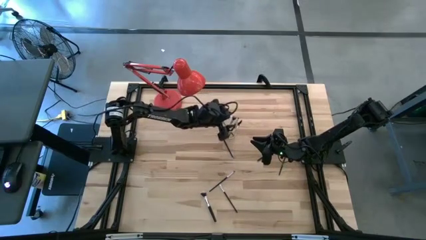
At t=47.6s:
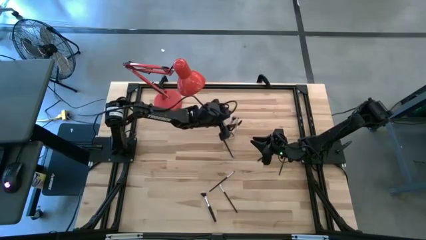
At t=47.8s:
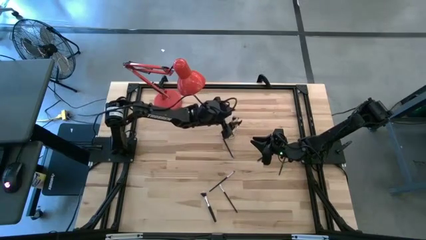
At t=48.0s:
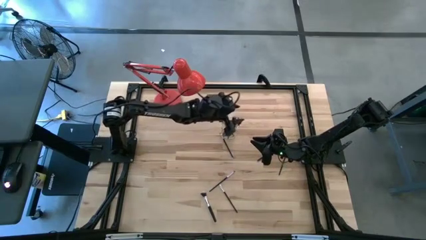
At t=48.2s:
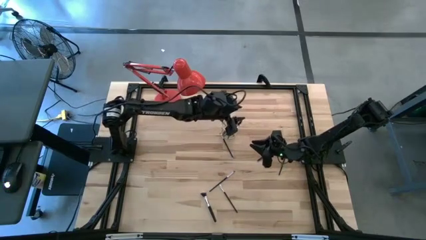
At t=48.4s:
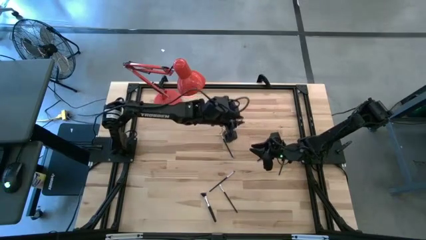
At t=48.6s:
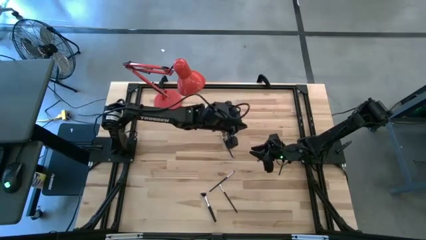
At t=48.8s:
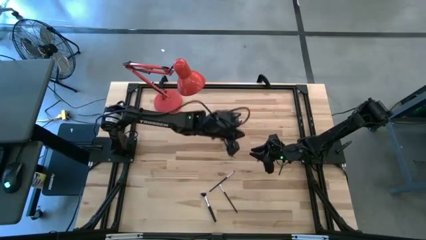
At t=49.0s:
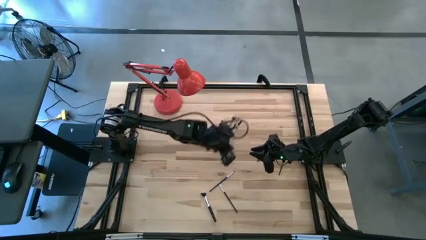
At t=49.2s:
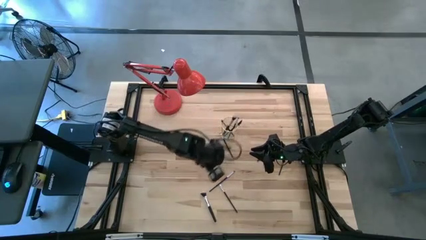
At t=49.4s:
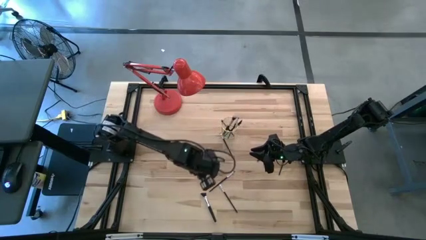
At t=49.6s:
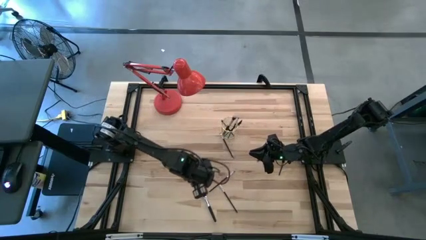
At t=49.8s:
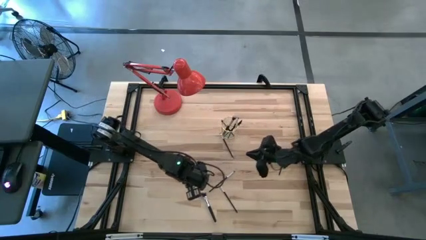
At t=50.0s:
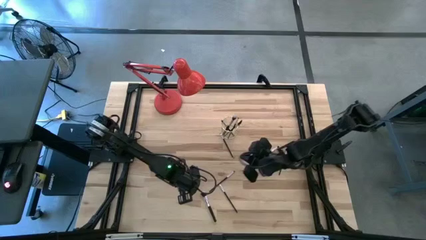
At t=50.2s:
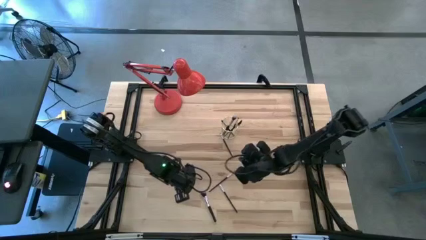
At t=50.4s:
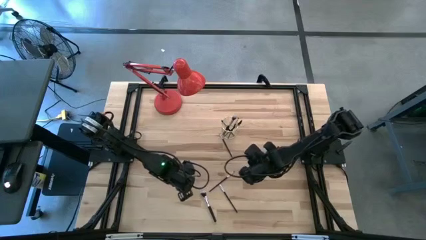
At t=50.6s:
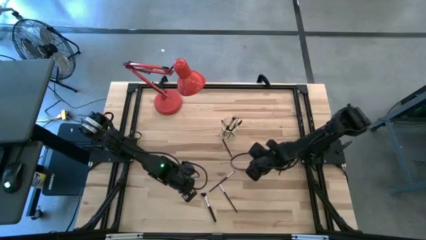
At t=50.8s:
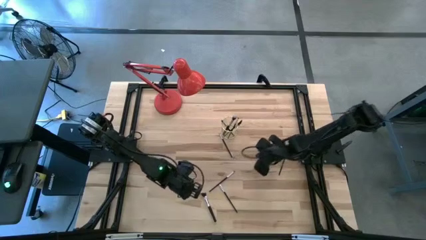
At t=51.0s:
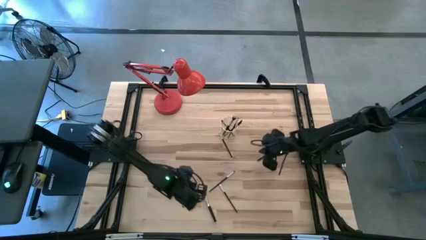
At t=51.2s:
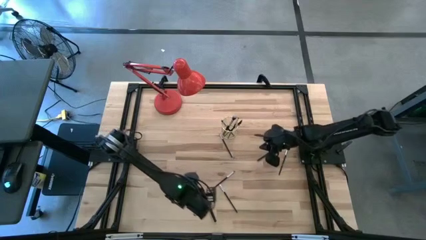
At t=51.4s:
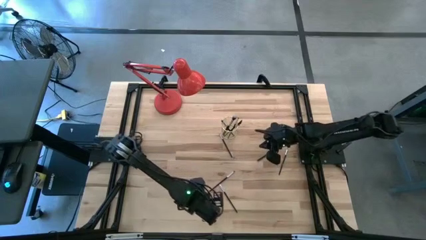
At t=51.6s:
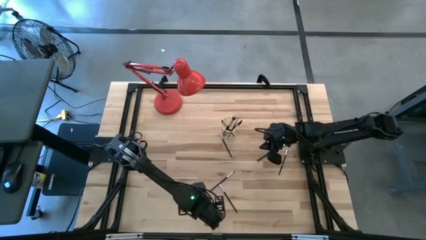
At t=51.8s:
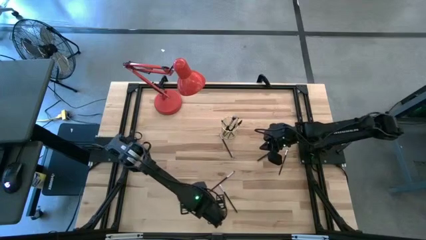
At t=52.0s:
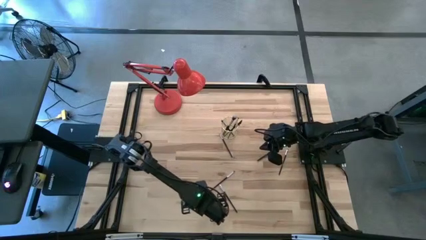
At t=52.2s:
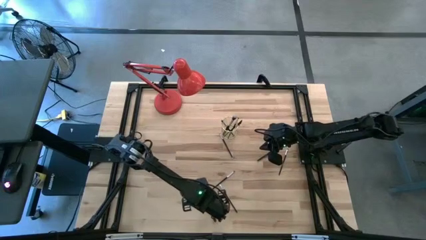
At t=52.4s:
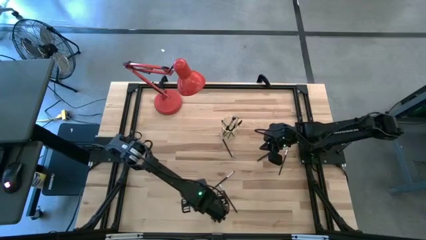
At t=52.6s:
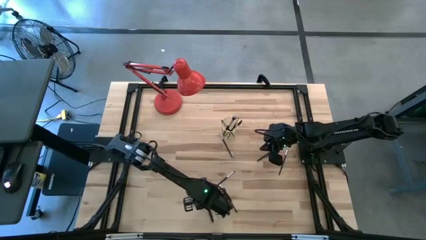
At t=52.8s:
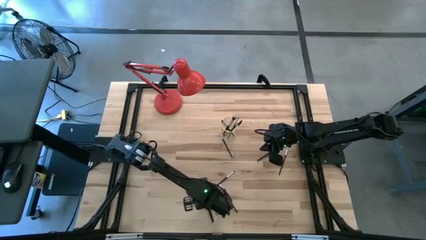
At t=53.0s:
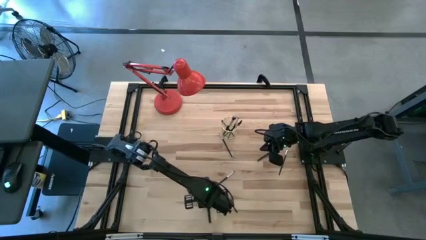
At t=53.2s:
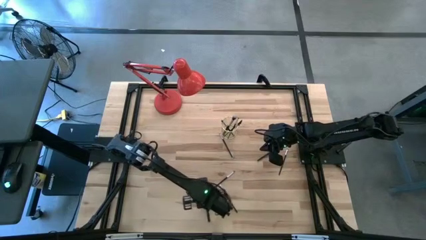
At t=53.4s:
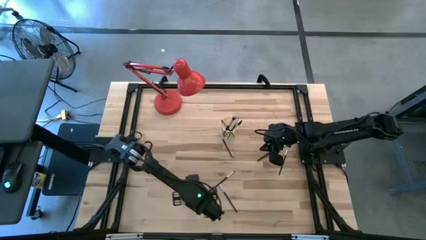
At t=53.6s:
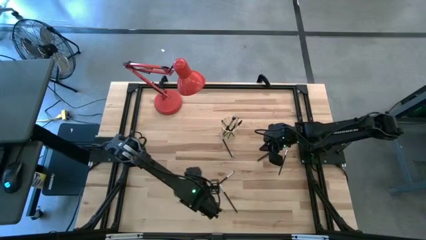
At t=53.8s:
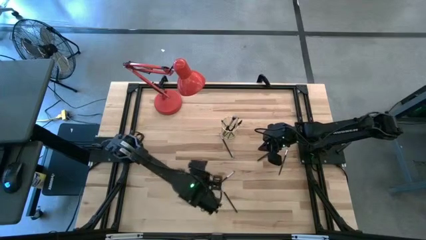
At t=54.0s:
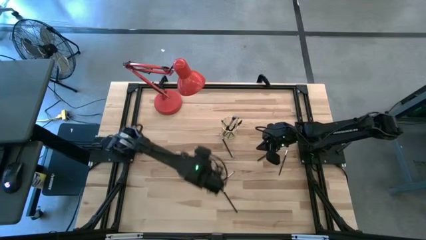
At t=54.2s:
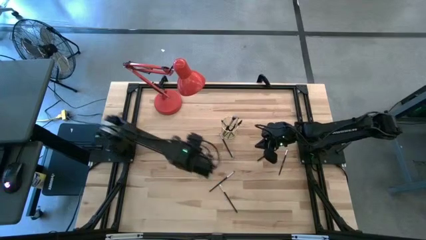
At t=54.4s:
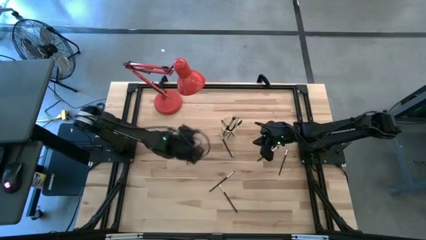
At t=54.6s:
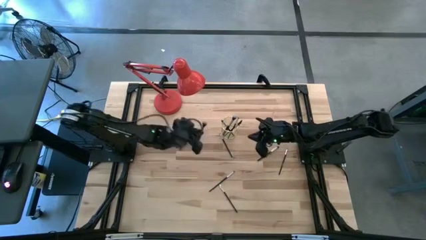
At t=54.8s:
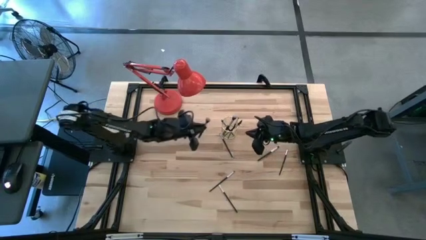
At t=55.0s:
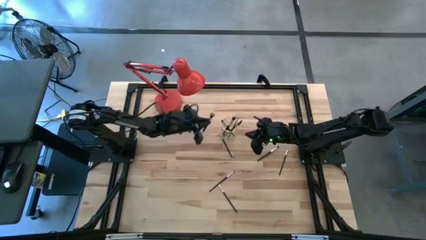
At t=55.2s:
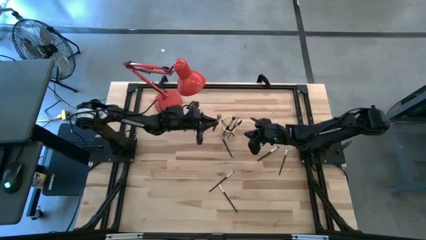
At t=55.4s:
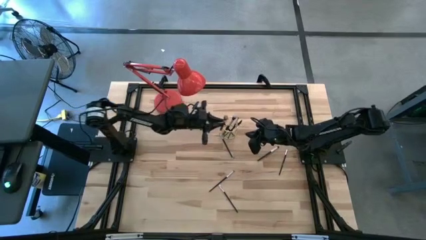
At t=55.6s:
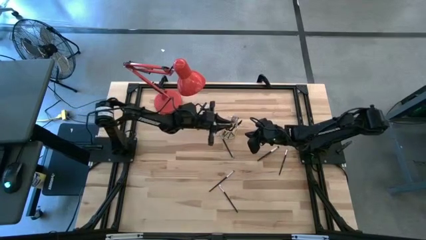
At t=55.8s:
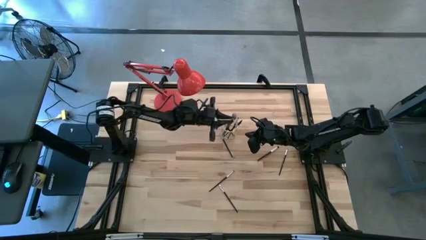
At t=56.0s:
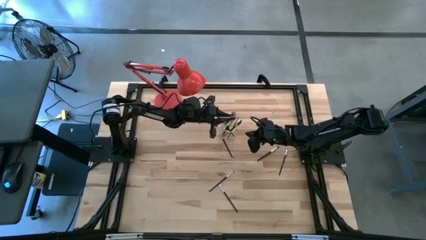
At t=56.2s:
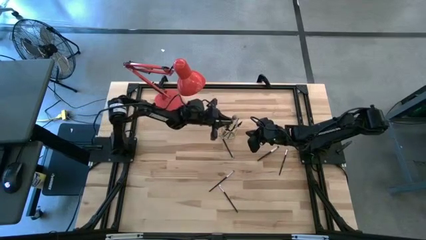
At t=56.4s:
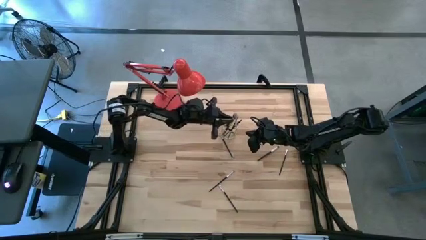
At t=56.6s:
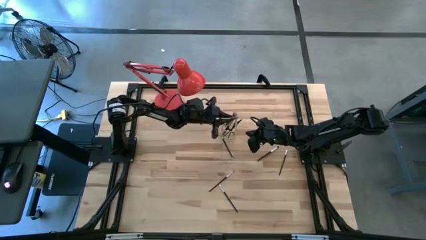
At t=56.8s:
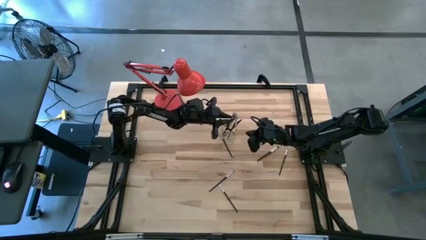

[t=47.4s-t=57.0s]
Task: Put items in baskets/containers
Put the black powder brush into the yellow container

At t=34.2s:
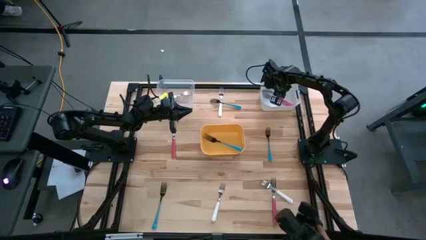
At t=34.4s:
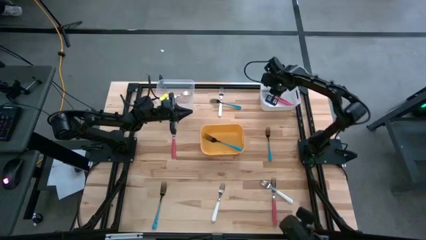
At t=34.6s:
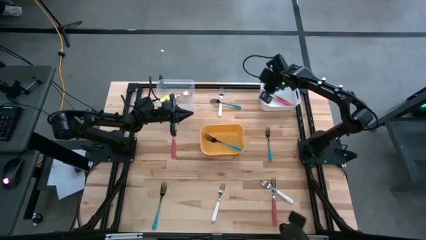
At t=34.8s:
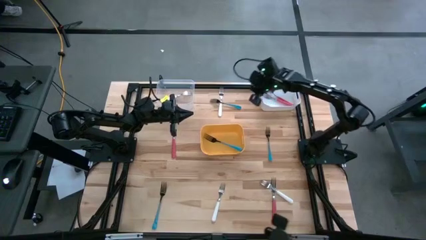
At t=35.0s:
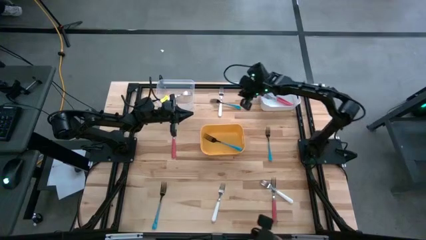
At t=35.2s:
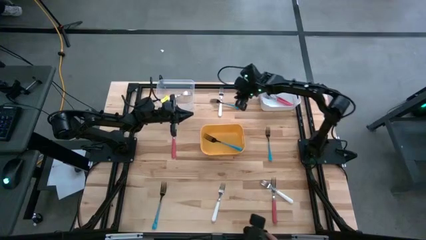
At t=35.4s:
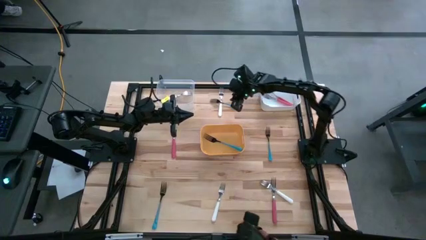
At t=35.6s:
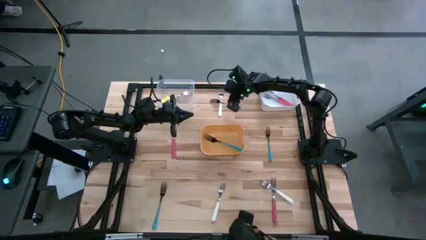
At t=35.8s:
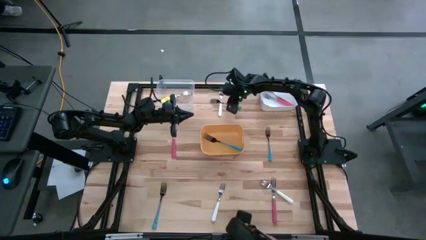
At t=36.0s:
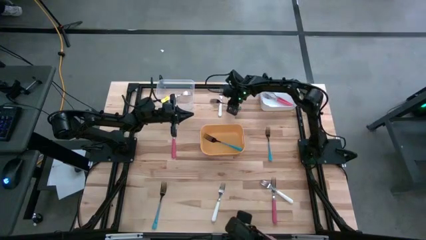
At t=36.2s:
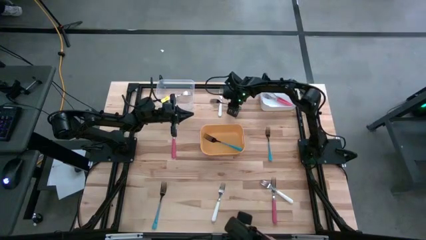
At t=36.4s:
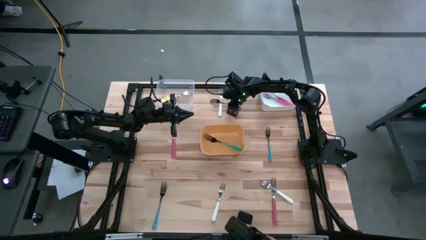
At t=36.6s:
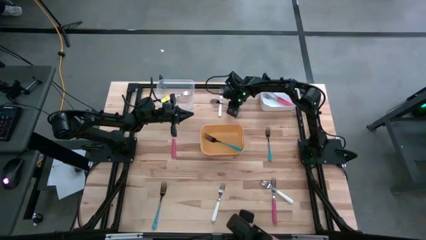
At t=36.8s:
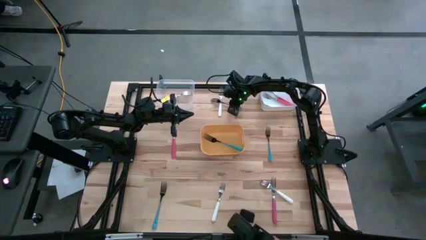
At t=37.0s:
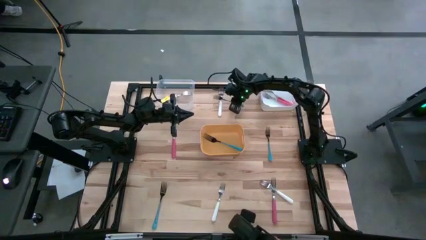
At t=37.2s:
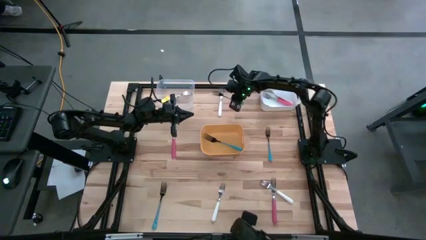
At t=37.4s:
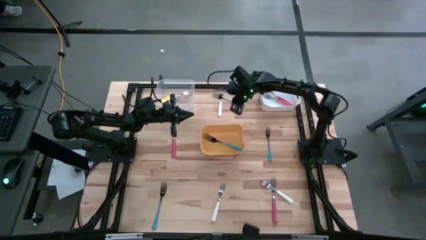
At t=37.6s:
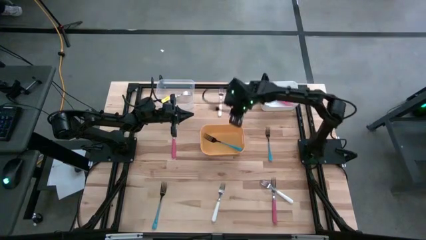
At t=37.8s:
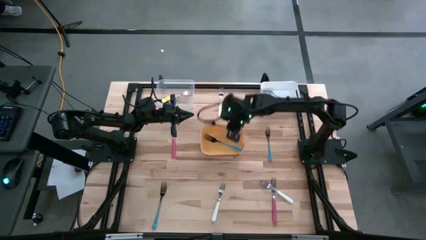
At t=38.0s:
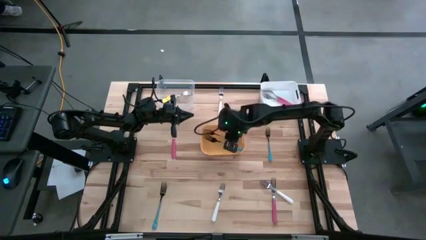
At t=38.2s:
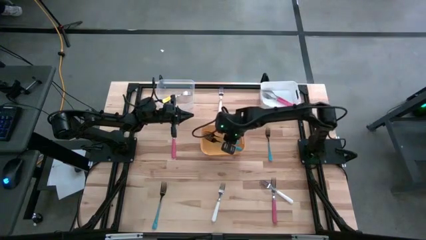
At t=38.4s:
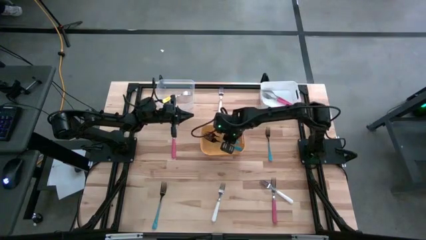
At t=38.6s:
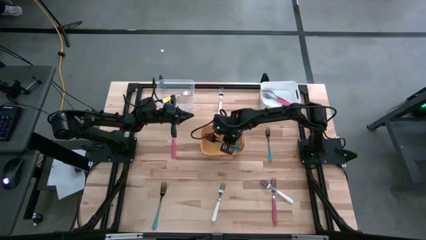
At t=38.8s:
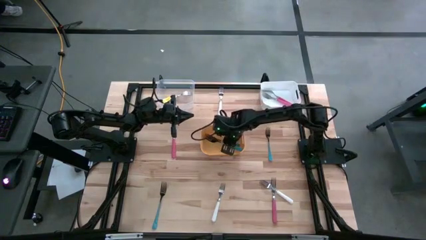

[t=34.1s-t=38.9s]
Task: Sort silverware by color (type)
Put the blue fork into the yellow bin

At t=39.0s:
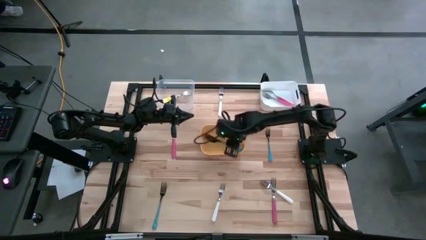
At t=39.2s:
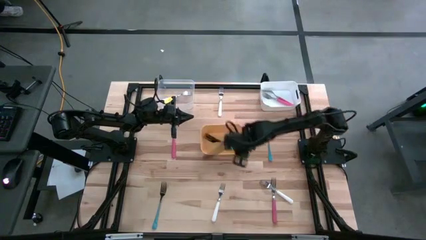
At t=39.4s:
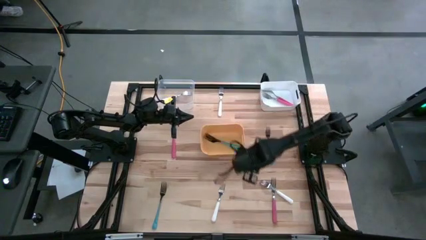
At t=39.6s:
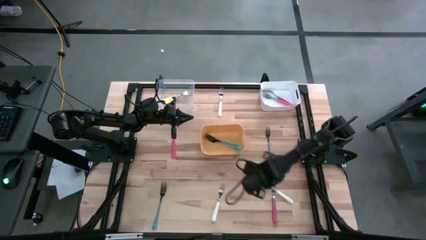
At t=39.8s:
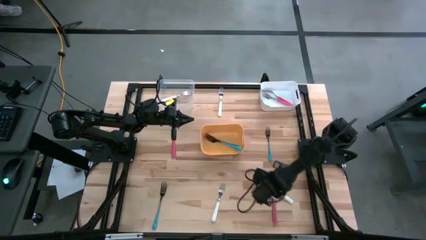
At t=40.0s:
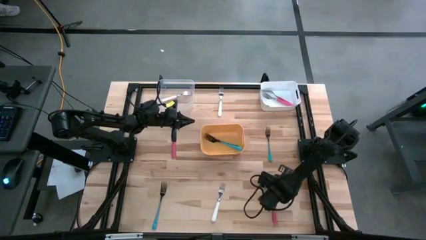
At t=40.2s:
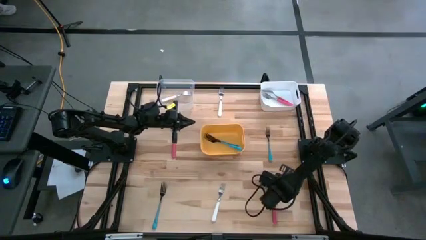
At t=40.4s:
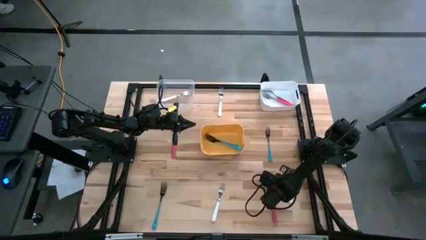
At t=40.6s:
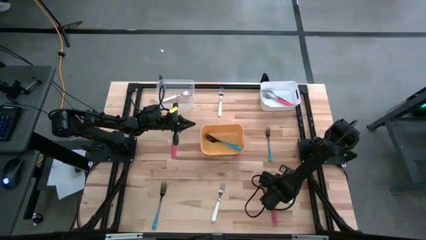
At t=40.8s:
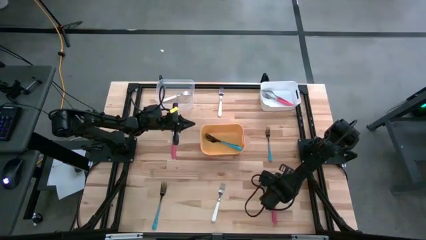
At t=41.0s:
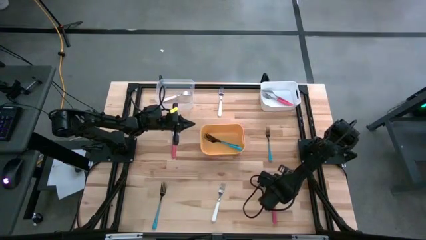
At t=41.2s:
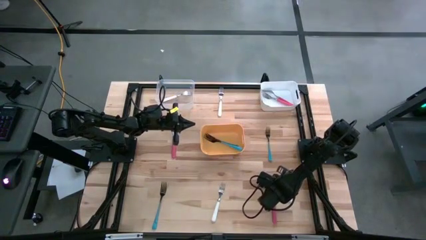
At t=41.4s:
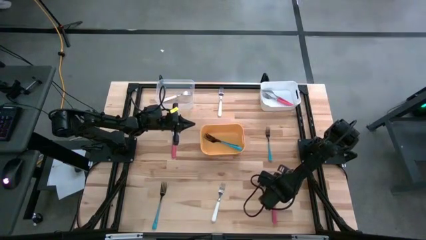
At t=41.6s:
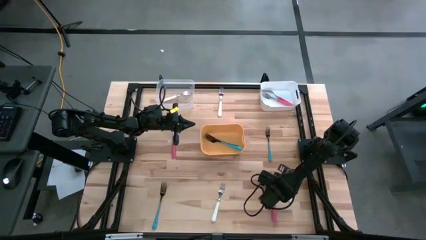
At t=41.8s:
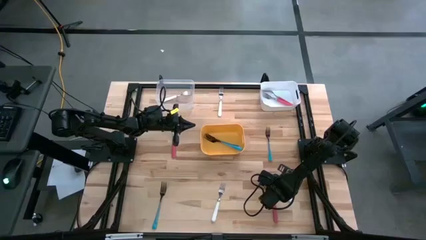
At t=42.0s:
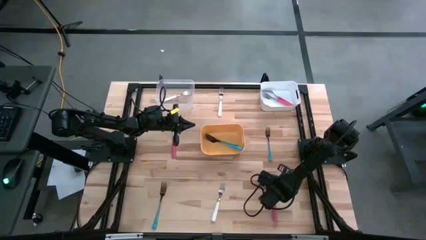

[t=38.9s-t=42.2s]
Put the white fork into the transparent bin
